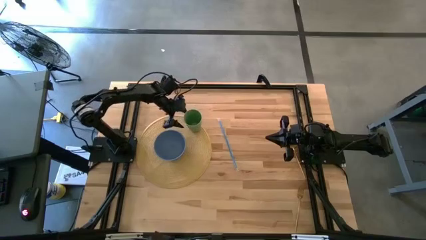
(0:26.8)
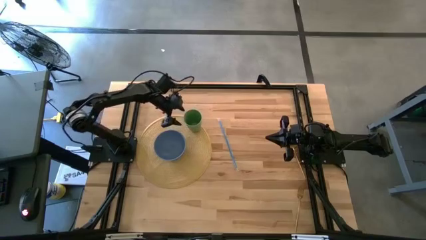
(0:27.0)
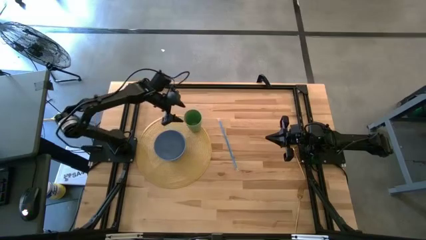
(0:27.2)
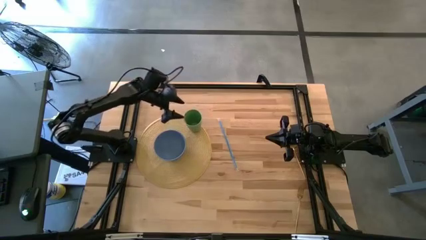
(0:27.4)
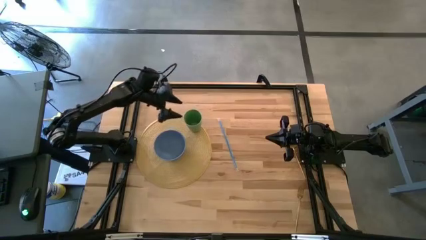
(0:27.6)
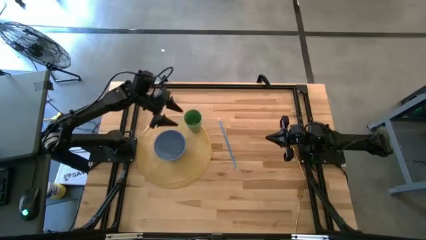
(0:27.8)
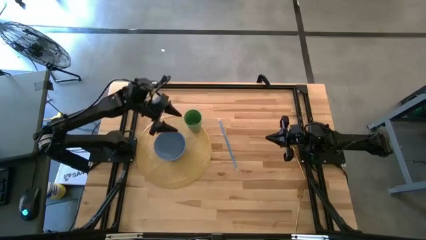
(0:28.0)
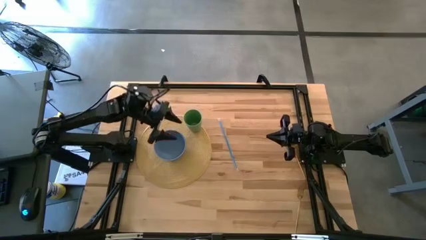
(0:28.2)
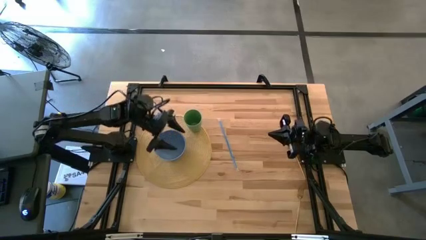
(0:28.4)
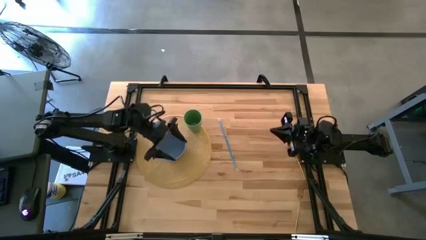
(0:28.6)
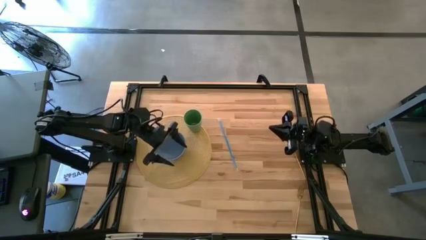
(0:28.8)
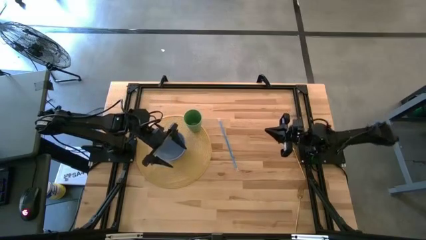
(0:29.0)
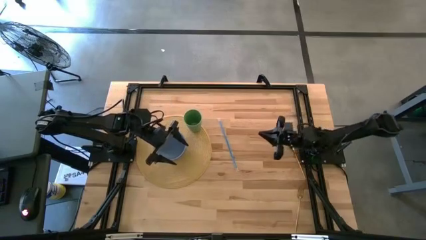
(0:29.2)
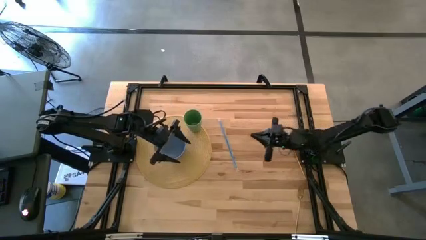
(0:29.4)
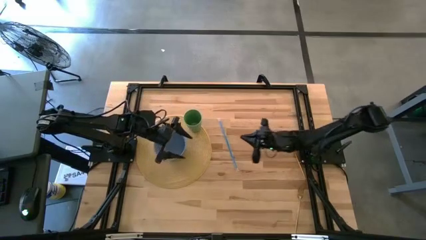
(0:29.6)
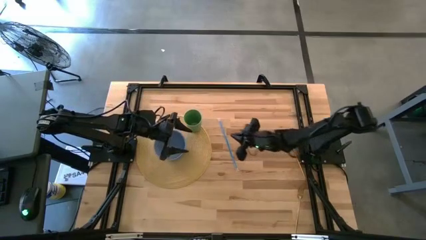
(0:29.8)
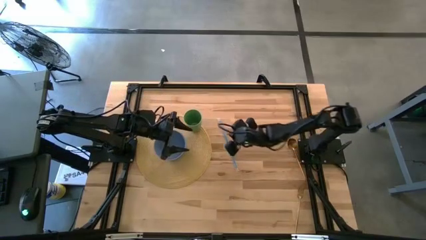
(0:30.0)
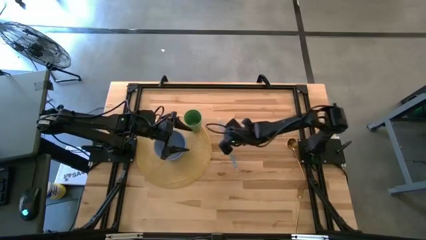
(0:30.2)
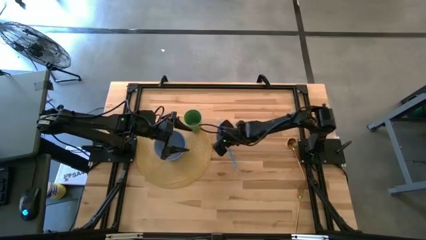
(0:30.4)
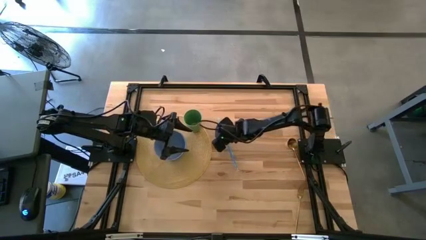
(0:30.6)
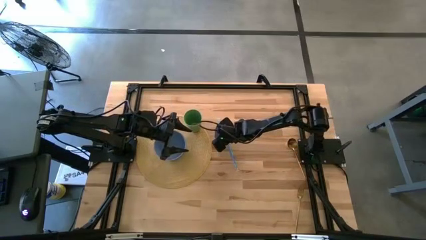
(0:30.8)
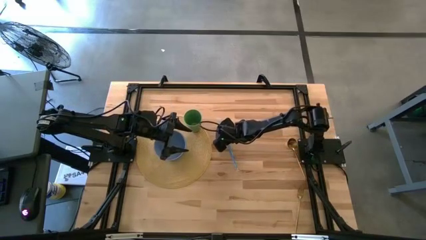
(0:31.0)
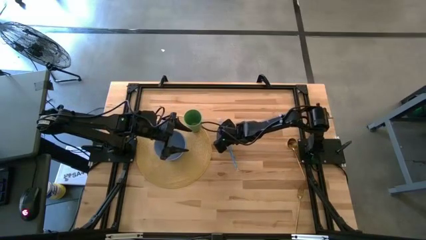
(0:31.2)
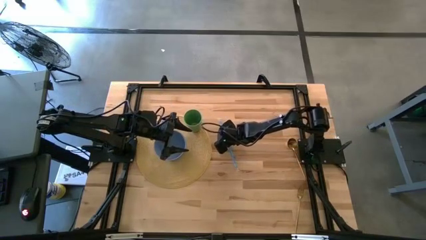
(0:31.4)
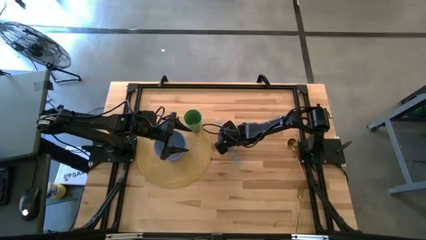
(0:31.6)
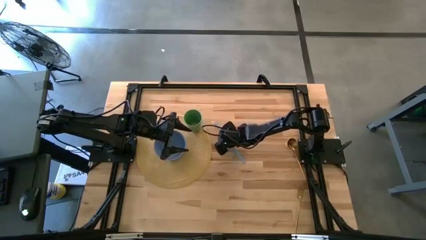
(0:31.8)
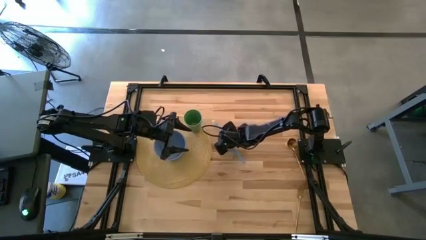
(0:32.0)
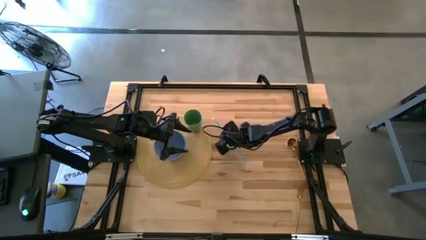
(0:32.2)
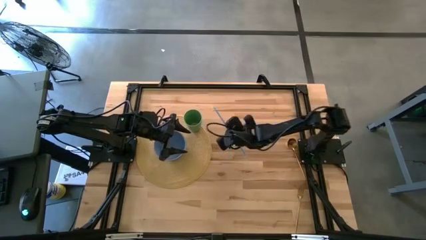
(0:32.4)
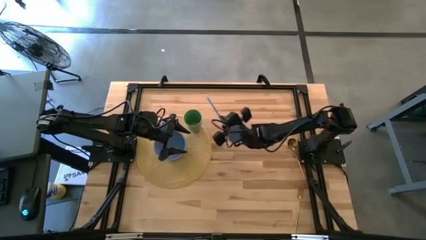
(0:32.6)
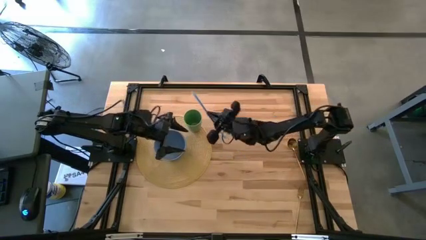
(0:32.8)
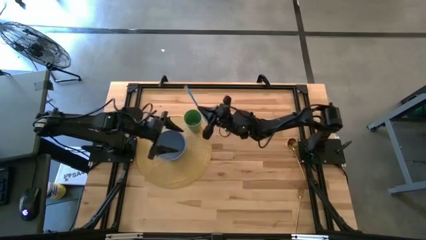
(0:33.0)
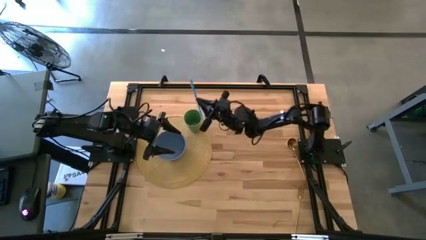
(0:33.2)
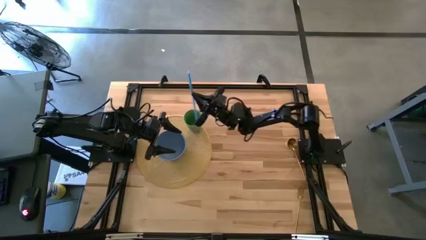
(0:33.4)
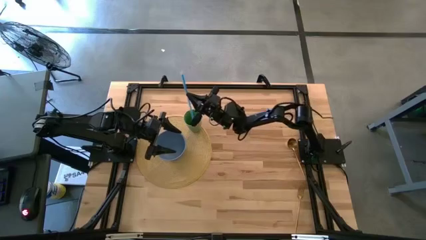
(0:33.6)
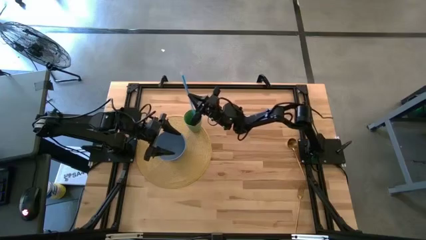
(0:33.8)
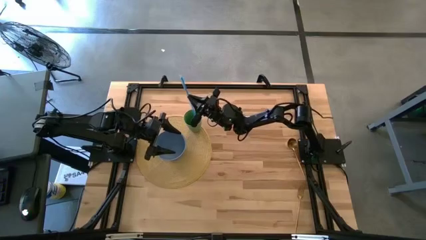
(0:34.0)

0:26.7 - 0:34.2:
Task: Pick & Place Utensil
Put the blue straw into the green cup on the brown mat

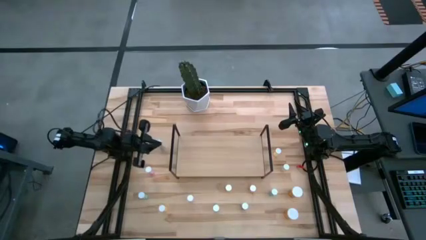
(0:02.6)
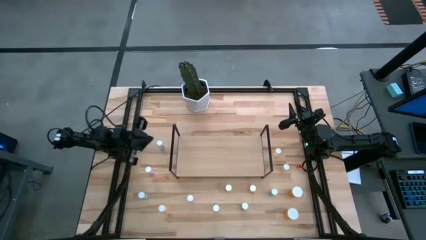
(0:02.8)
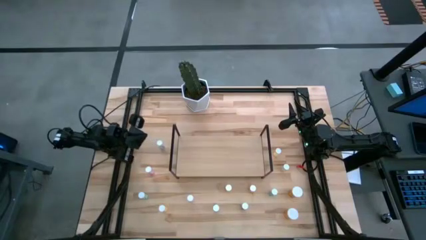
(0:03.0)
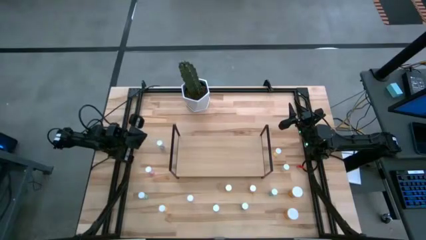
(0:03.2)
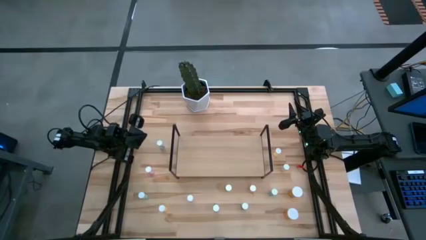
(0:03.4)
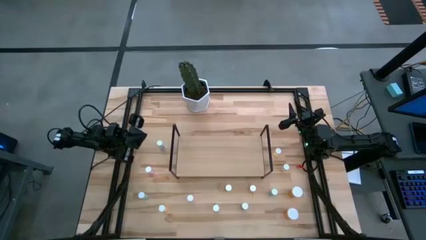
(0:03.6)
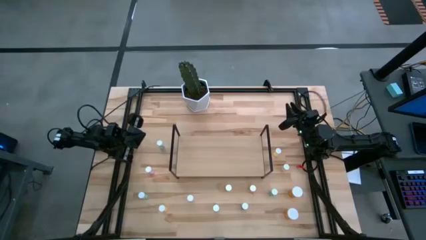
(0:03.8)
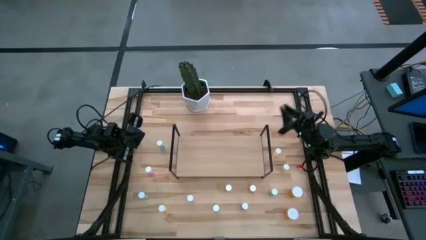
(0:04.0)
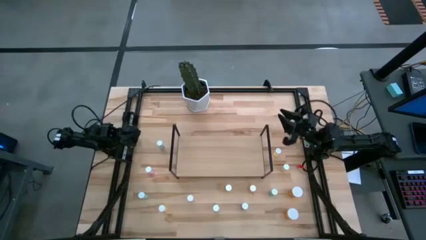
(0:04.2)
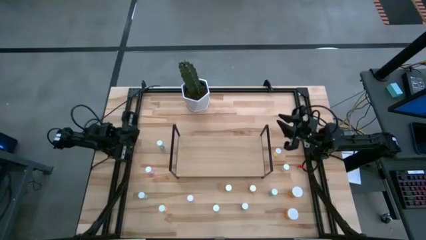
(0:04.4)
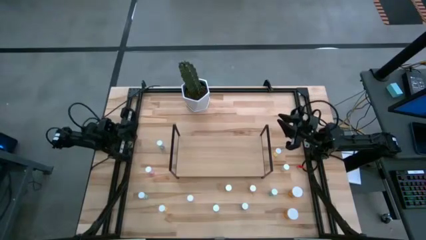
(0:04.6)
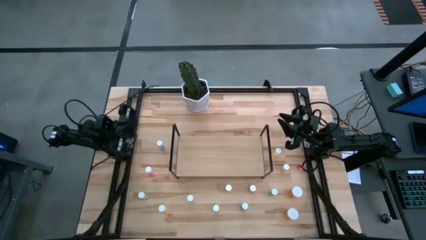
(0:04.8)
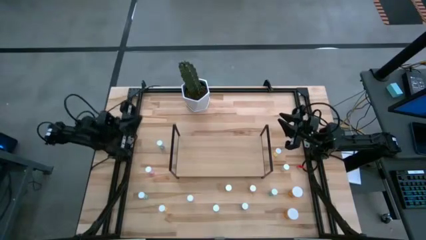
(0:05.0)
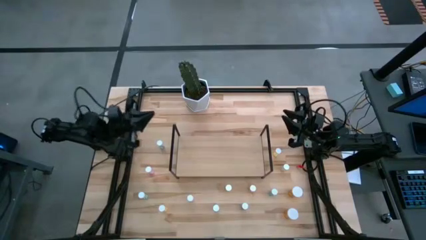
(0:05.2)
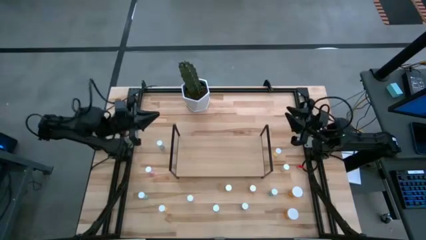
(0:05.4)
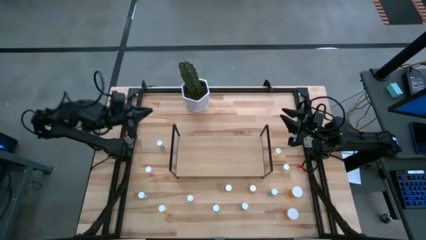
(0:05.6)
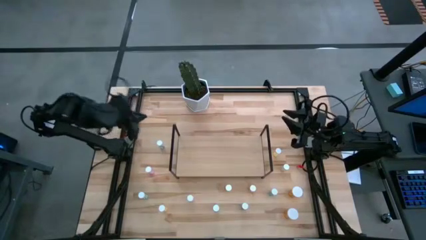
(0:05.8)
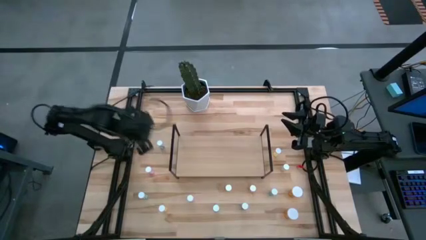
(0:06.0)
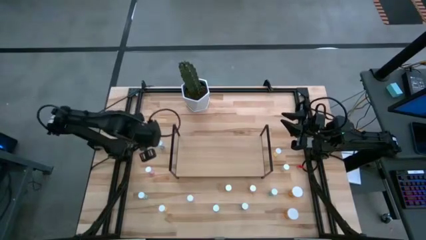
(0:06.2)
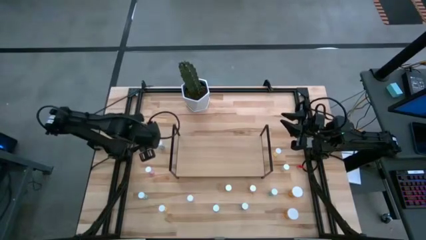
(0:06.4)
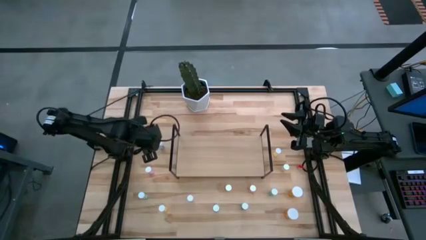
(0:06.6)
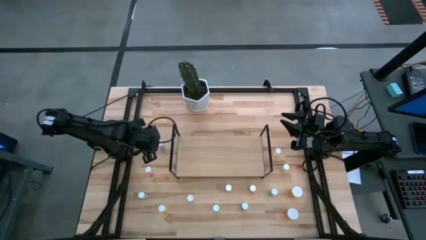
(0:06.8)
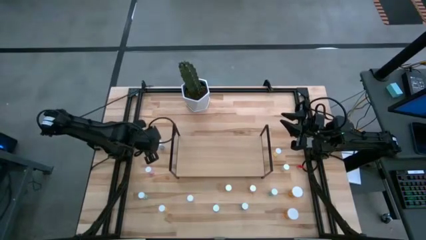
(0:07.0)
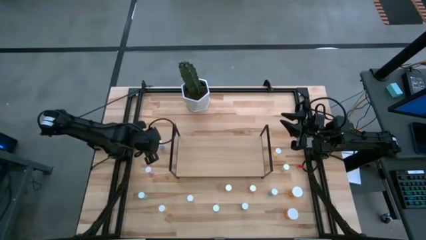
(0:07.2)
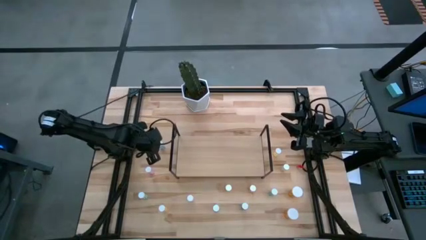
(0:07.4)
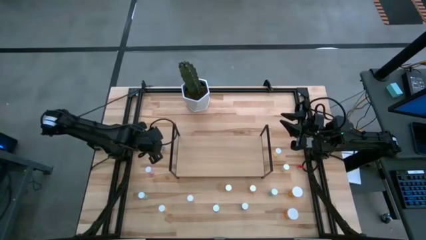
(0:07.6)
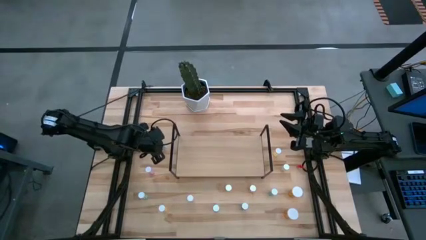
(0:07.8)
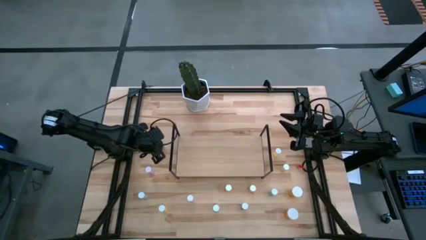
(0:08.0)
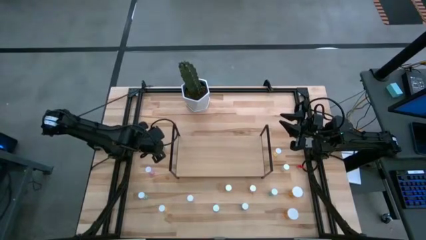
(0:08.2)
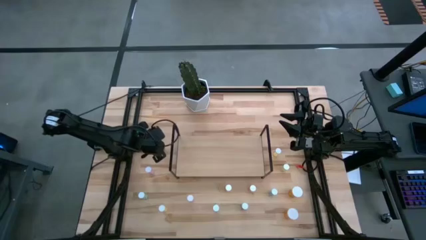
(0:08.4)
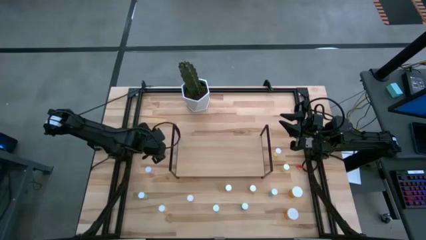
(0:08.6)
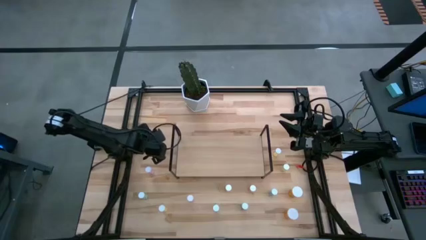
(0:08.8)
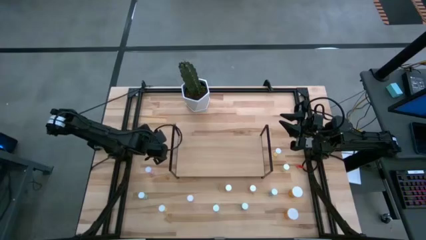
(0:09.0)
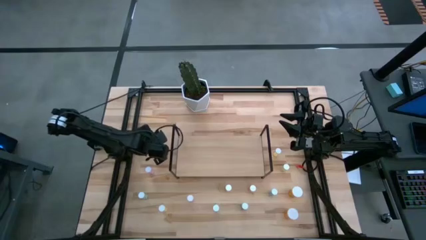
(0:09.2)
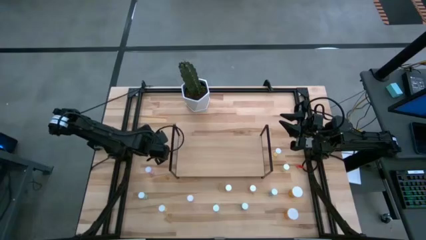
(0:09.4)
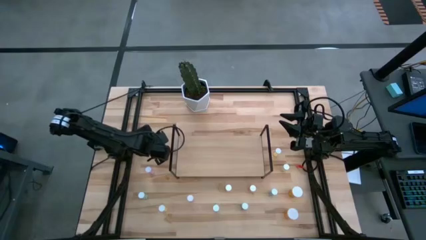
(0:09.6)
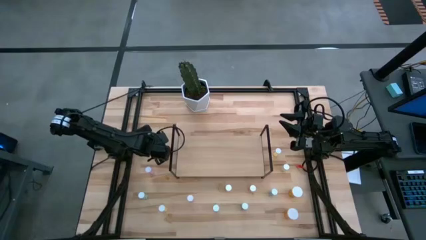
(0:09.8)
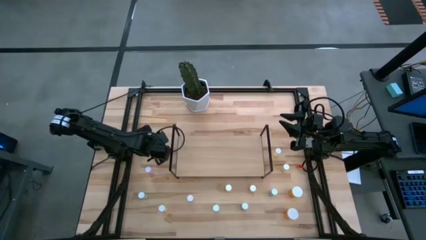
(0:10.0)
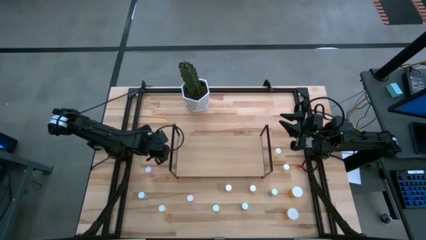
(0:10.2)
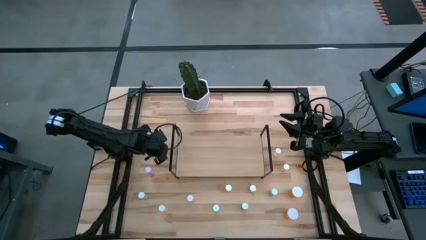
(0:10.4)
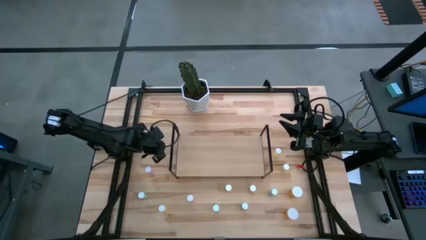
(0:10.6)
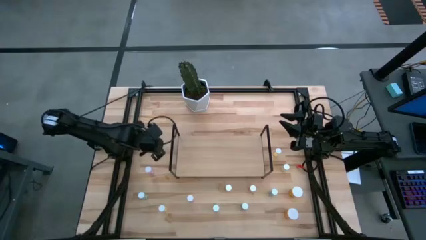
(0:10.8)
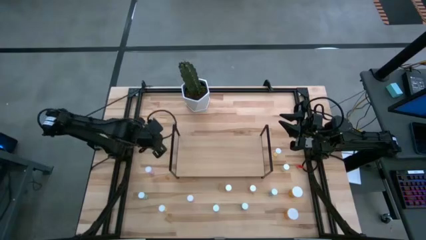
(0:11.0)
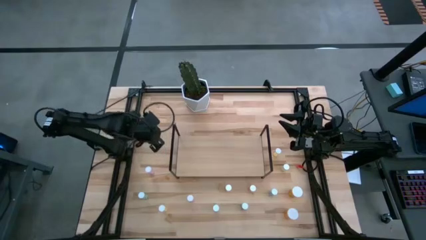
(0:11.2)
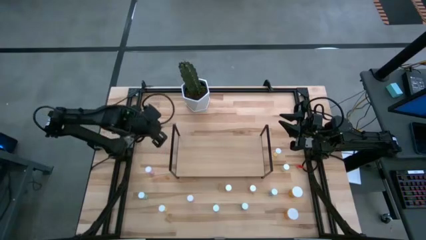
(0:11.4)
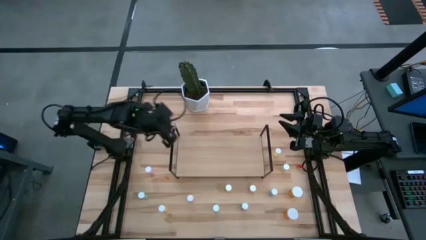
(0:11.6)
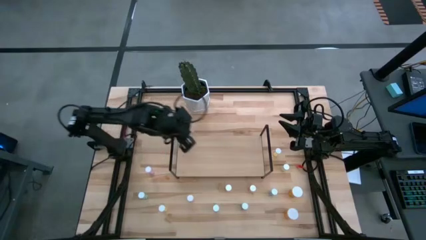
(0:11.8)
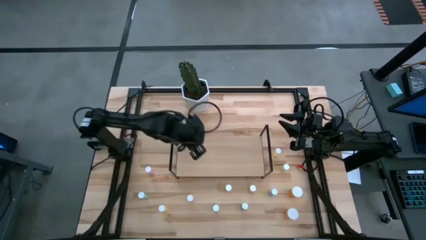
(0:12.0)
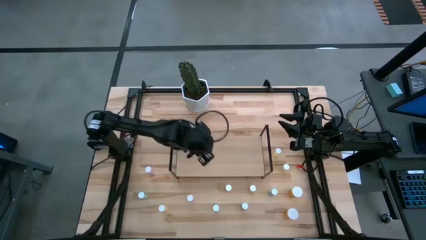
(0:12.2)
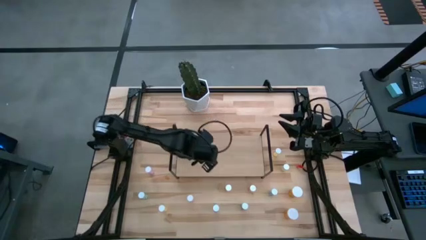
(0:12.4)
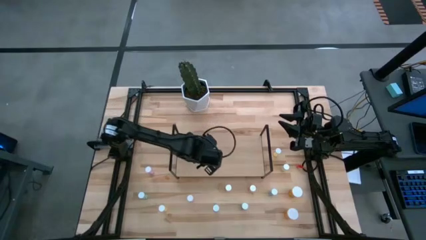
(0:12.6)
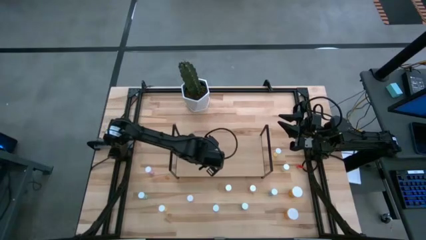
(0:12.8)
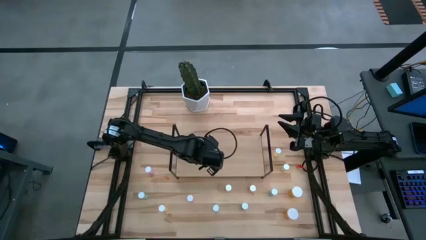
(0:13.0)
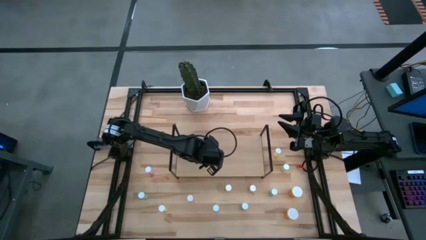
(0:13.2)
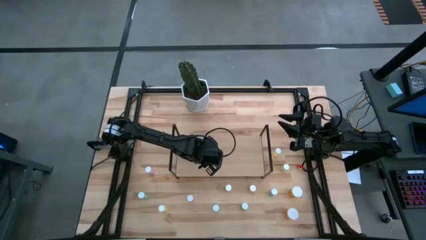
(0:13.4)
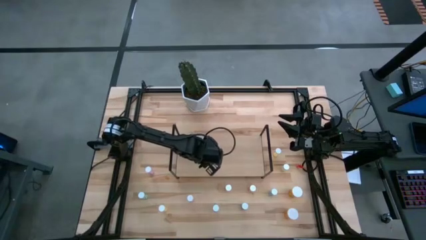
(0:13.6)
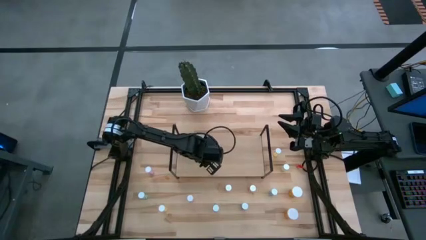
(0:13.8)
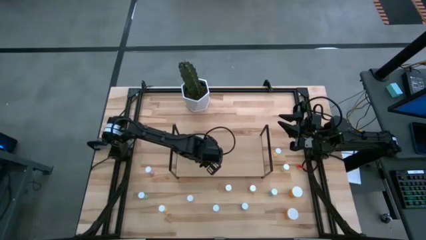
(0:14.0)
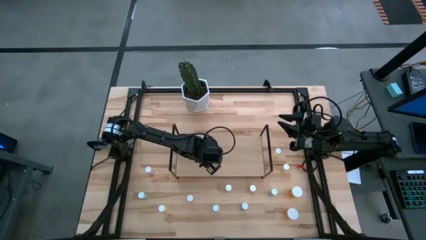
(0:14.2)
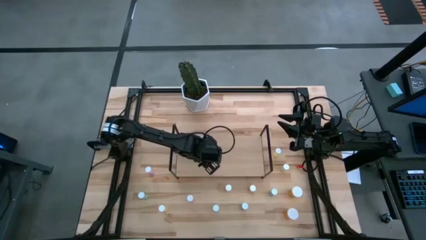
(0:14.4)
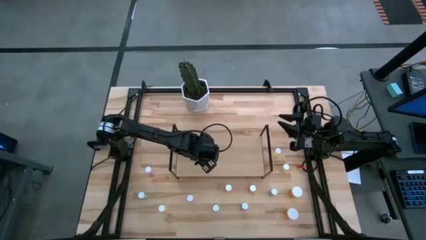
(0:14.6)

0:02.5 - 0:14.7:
Task: Pick and place medicine bottles onto shelf by color
Put the green pill bottle on the shelf
